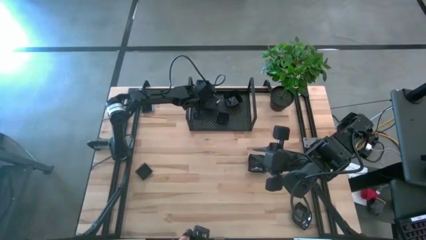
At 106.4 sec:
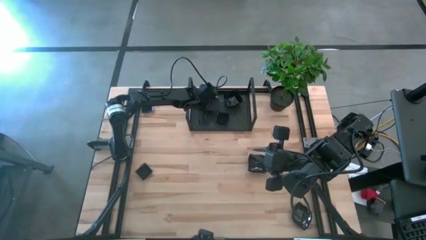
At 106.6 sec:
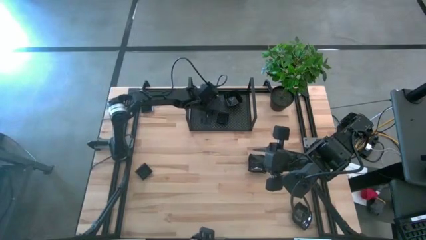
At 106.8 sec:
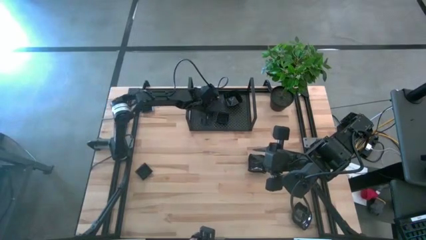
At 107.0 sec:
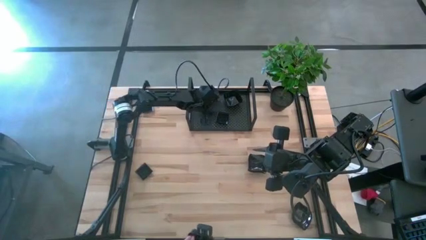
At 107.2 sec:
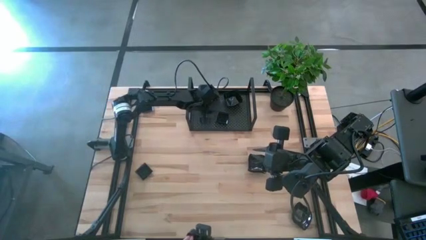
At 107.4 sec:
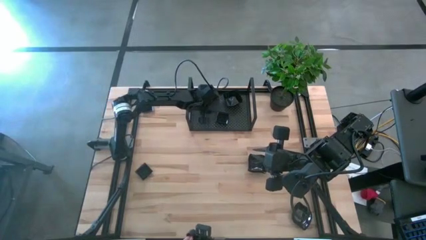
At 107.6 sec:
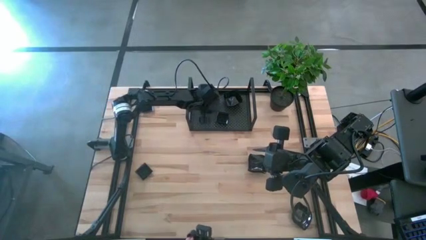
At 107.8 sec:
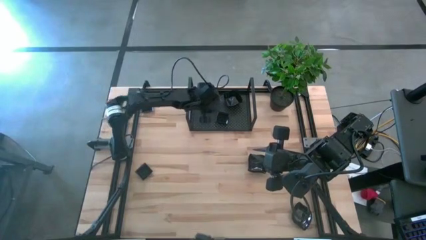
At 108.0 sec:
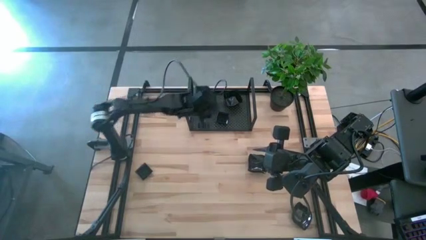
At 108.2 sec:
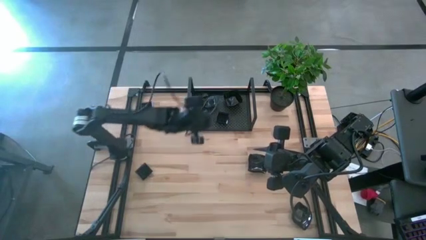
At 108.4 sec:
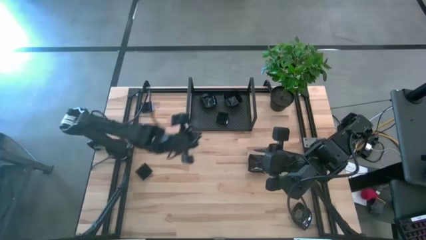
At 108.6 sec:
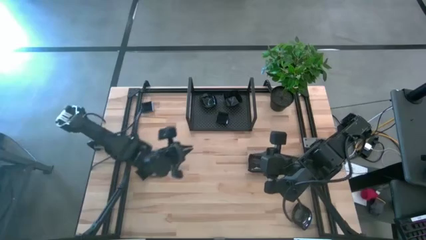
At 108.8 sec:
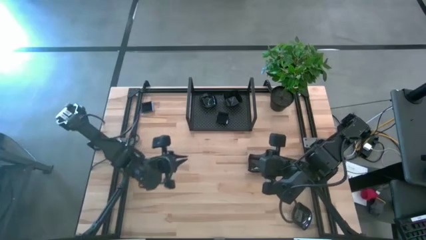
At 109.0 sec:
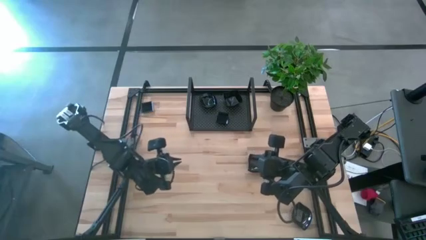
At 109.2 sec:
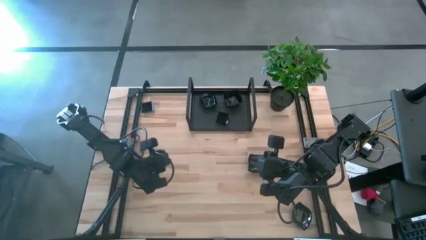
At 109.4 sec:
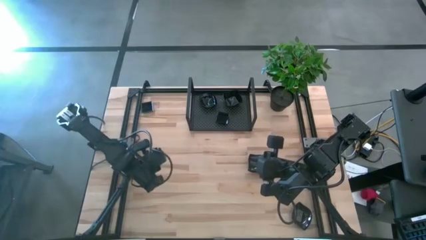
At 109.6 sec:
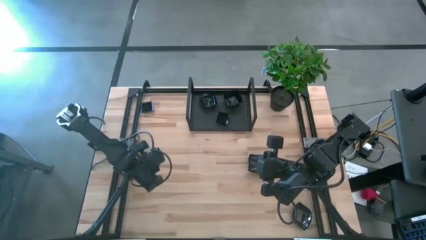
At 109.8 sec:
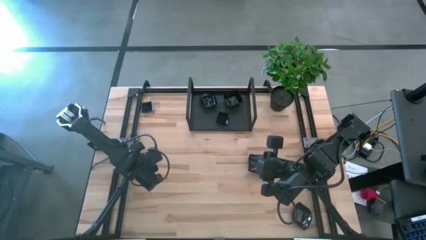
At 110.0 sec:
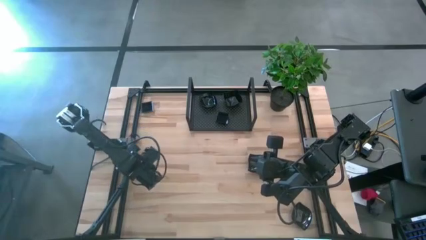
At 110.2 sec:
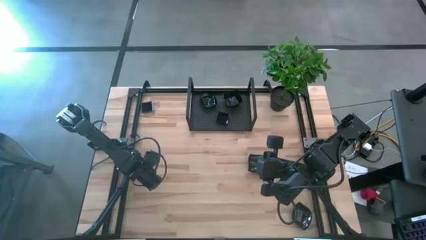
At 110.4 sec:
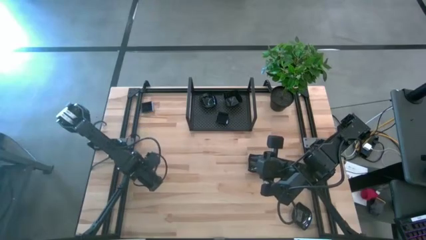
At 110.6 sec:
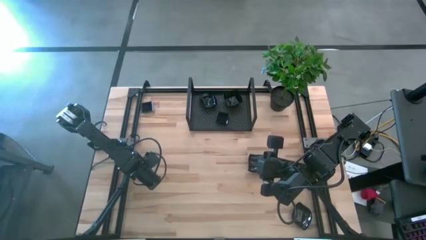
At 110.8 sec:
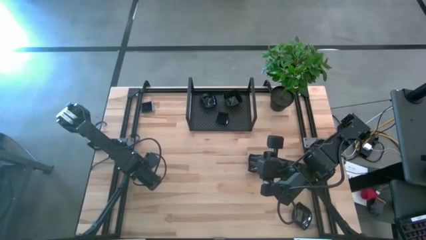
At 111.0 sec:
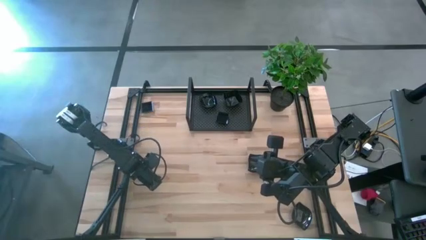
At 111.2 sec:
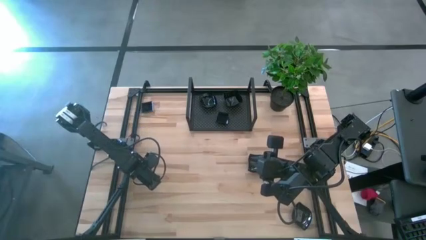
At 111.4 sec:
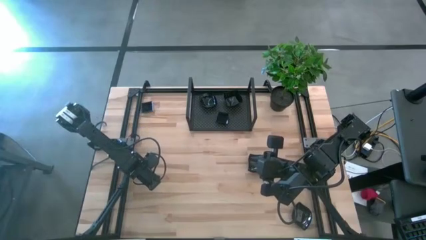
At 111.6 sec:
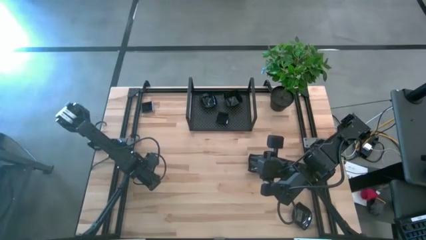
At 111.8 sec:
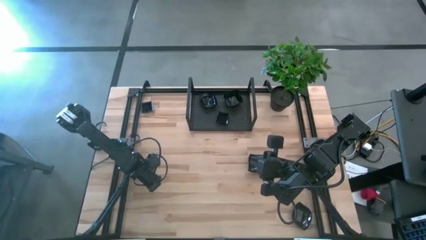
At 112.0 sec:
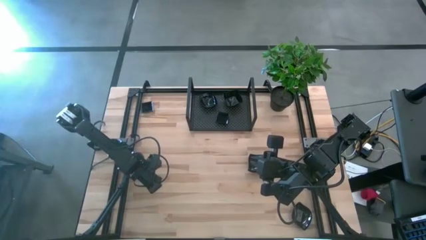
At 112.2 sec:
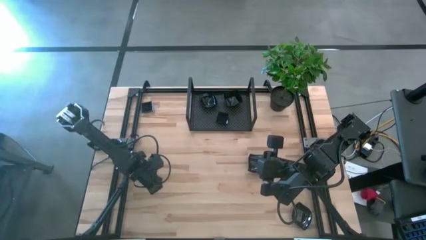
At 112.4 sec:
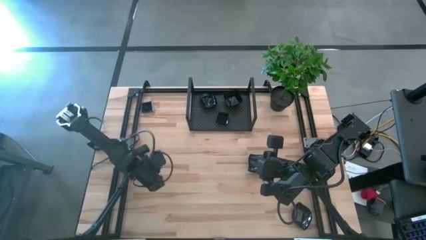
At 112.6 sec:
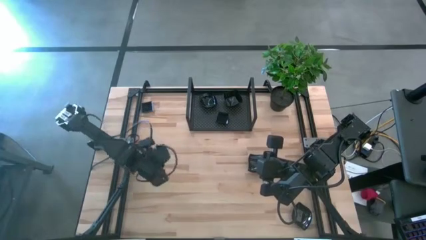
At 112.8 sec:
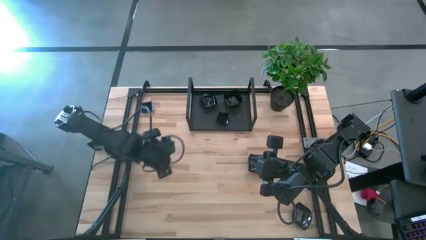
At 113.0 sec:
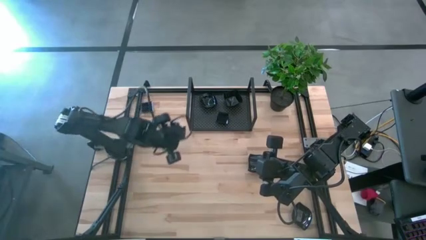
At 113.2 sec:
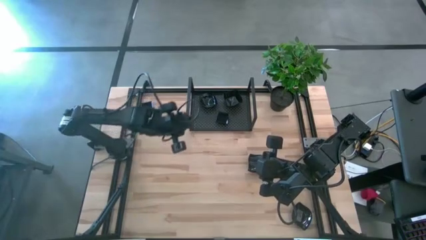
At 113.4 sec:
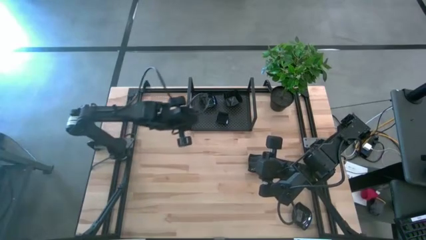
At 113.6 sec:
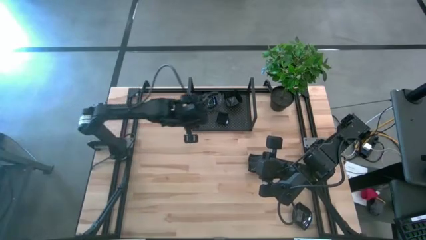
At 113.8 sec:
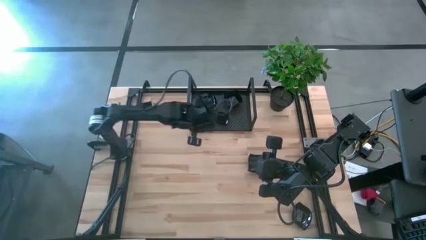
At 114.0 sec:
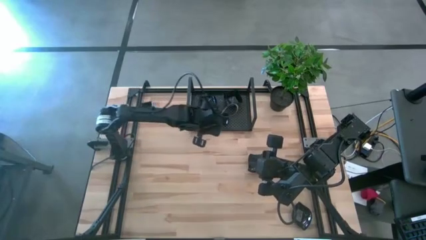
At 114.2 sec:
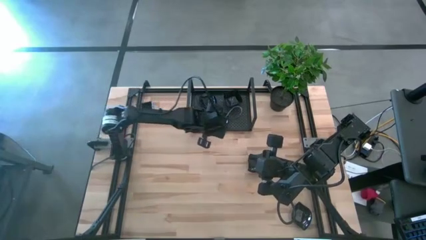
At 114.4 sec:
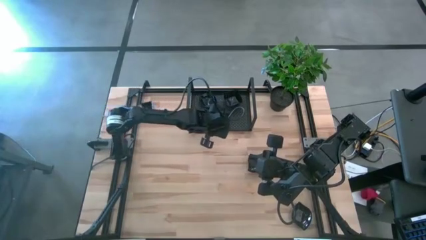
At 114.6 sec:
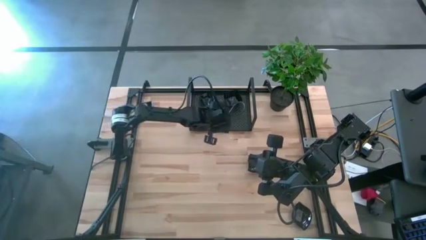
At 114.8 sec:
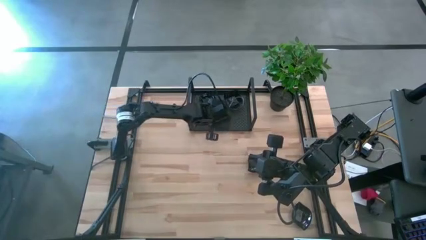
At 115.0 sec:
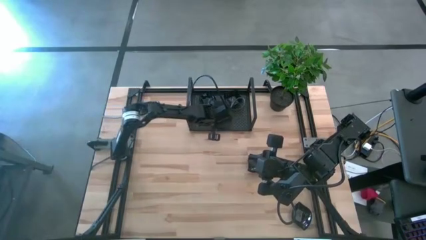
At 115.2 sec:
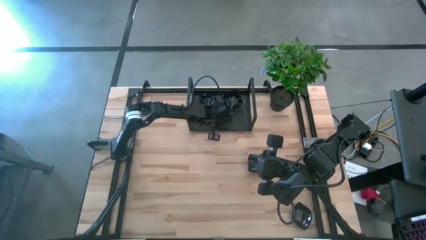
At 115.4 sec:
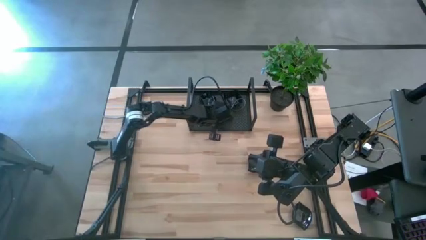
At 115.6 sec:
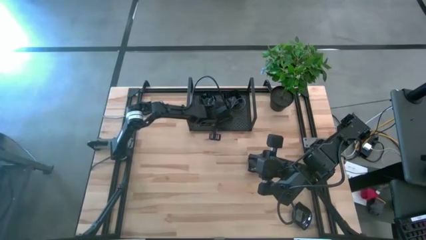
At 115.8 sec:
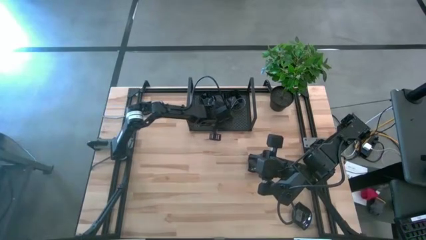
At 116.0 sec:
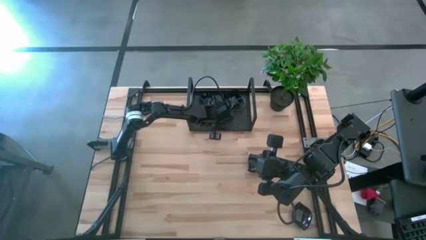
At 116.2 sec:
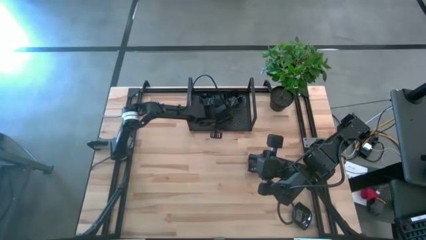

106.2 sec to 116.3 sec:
Task: Pick & Place Mini shaped plates
Stack the black square plate on top of the black square plate on the shelf

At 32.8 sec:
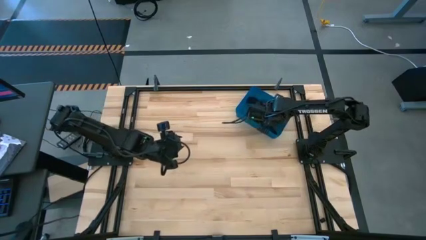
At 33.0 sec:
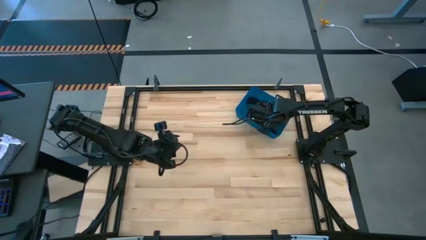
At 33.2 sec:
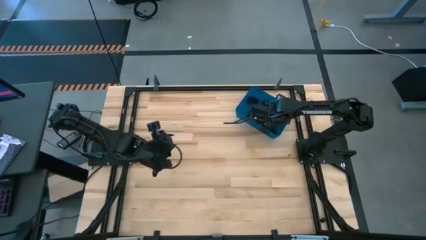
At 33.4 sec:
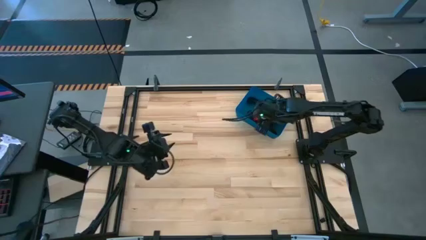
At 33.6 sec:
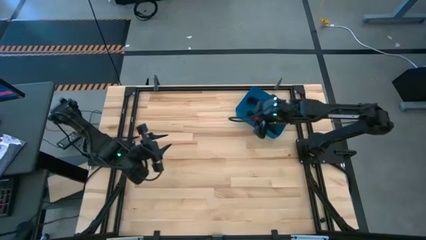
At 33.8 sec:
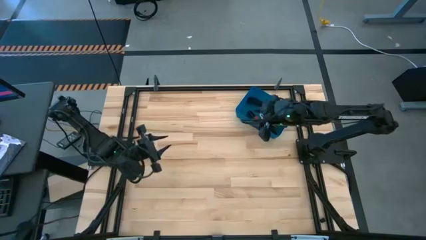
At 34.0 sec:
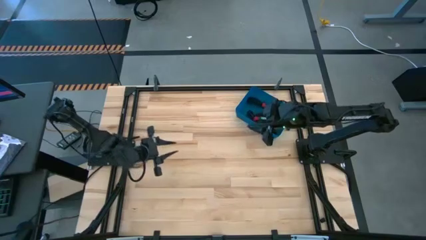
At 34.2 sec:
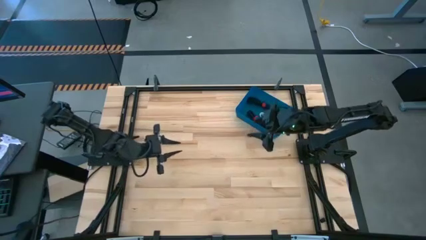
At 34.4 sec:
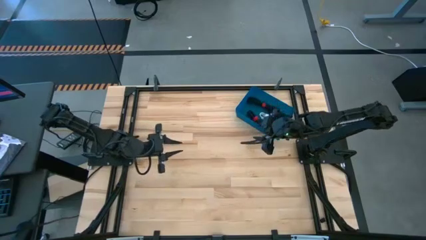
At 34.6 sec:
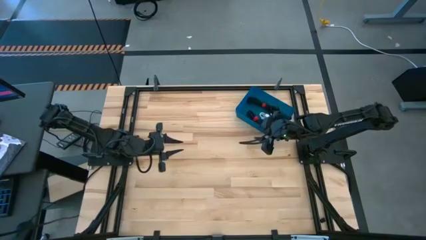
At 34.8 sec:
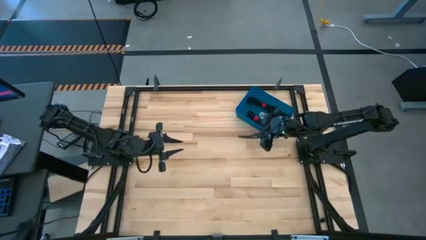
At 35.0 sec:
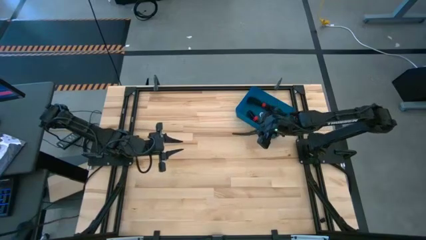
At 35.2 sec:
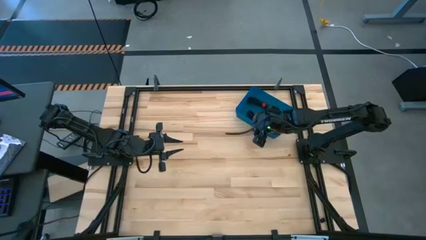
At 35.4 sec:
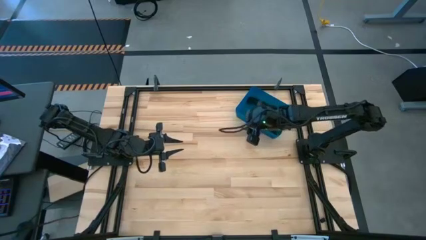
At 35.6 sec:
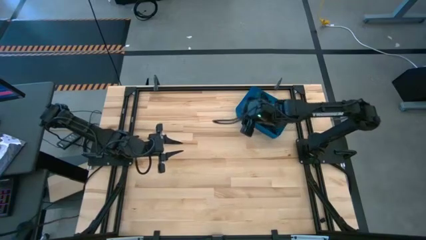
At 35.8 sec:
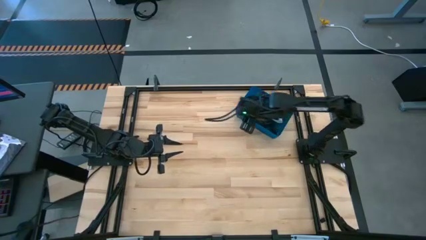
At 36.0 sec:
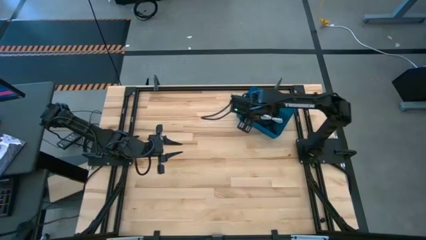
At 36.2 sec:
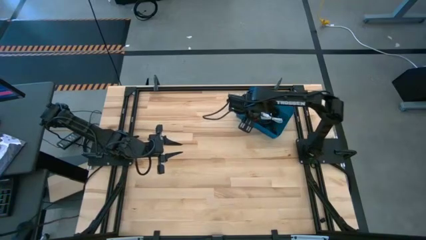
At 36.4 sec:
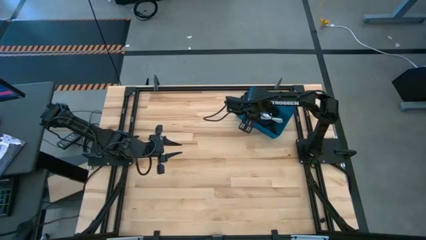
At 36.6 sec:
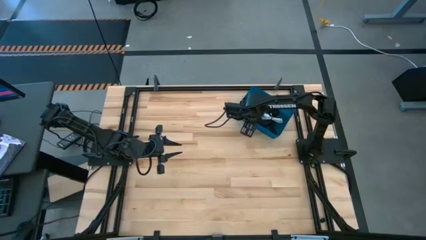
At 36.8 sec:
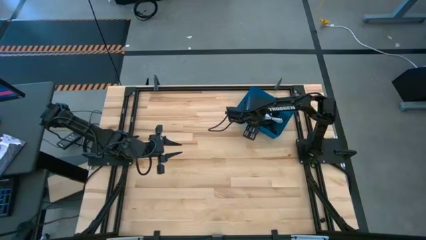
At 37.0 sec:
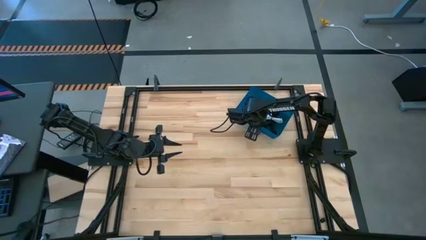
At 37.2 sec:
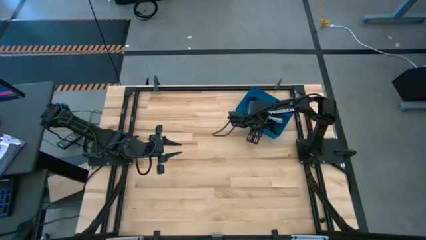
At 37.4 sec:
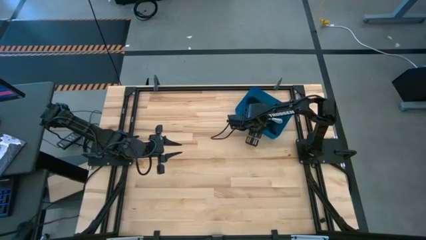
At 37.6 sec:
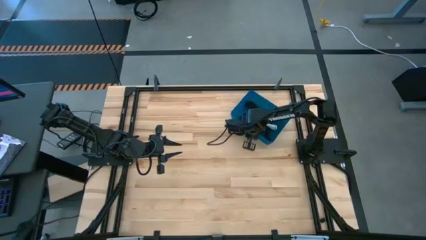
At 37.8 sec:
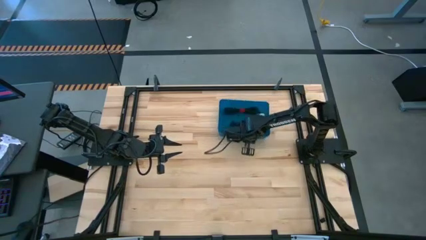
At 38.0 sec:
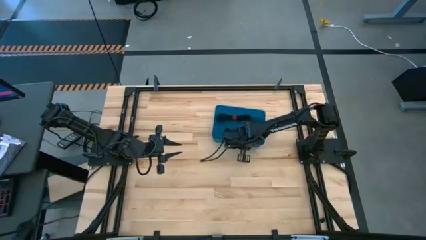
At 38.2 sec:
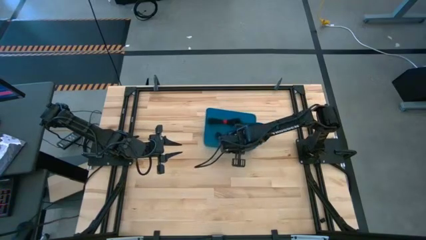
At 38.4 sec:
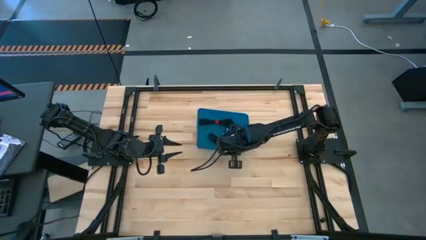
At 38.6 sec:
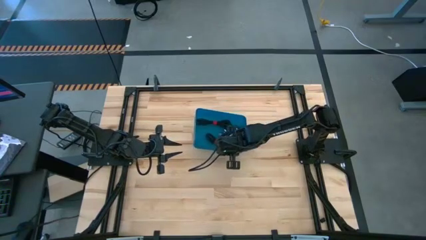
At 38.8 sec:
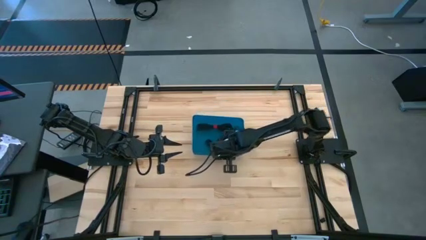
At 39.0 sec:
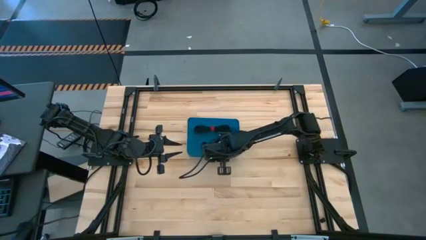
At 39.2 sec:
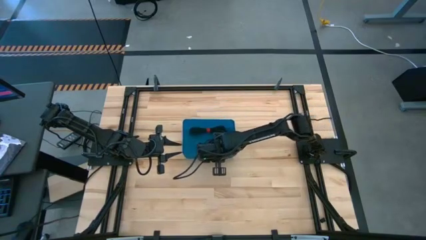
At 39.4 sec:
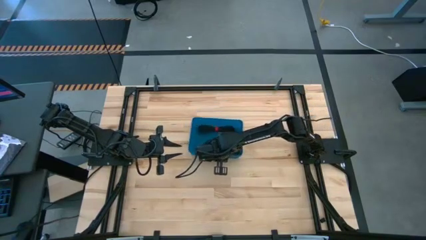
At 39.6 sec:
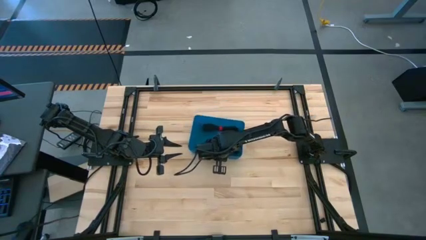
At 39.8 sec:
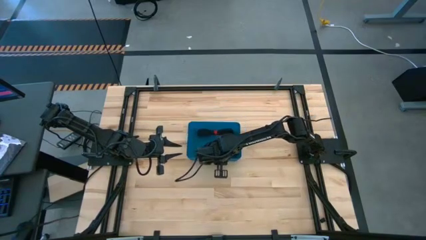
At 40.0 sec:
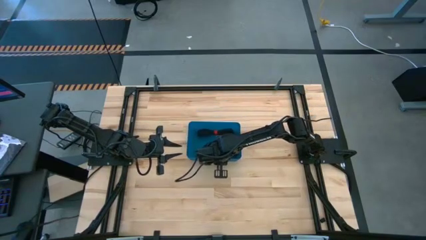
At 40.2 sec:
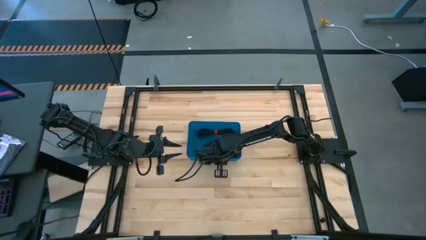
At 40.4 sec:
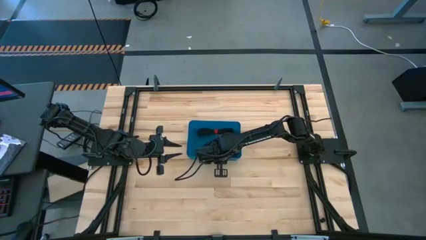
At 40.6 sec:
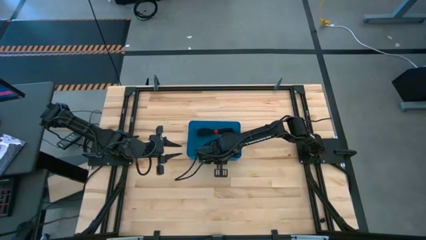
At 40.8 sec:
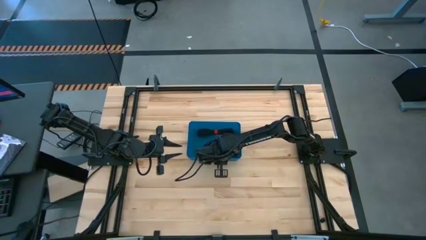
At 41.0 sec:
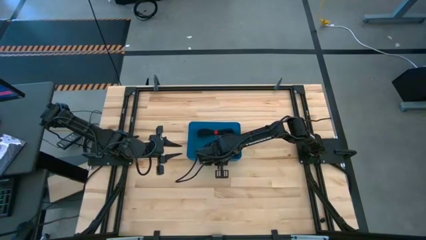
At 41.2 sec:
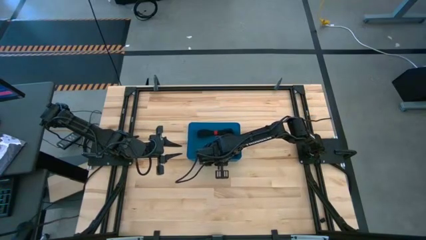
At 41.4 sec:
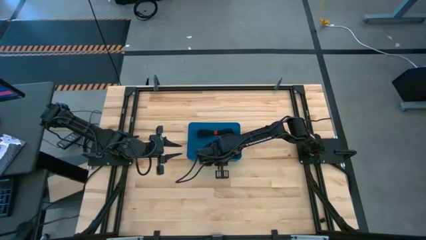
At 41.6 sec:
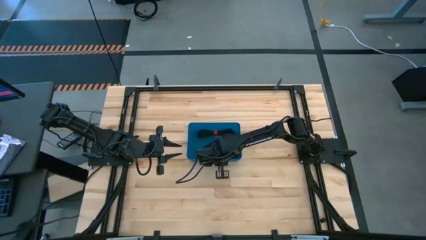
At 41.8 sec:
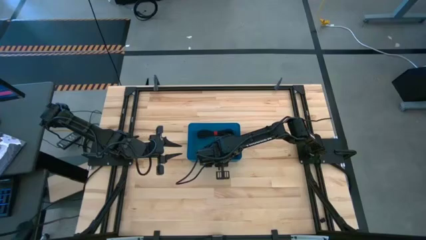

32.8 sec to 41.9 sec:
Task: Pick and place USB-C Cables
Move the bin to the center of the table
